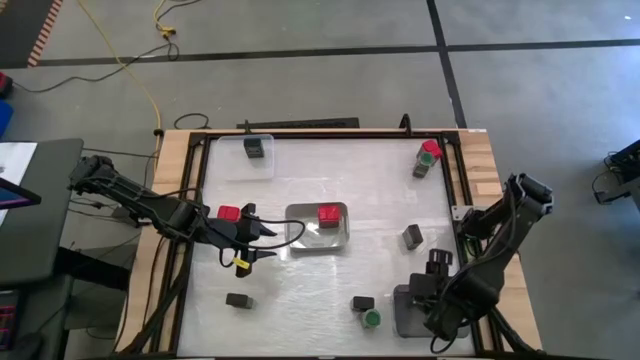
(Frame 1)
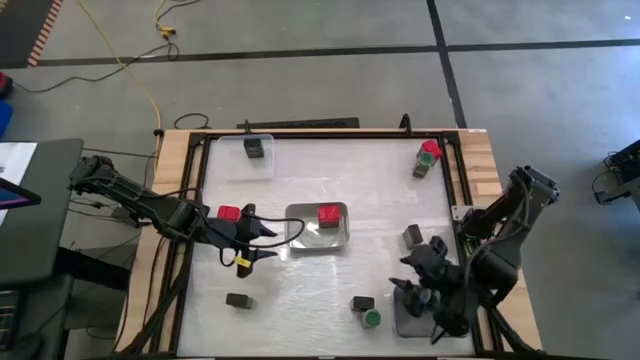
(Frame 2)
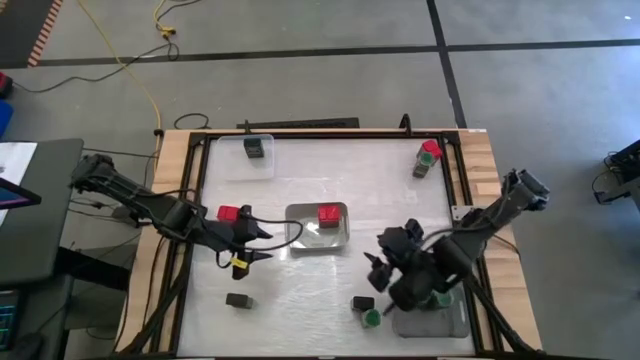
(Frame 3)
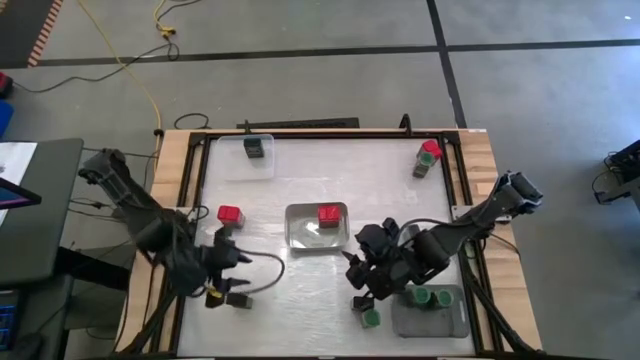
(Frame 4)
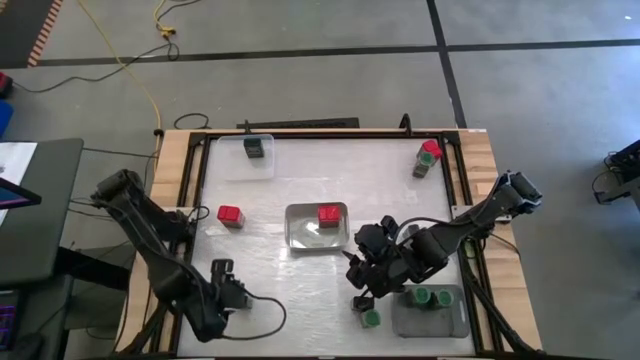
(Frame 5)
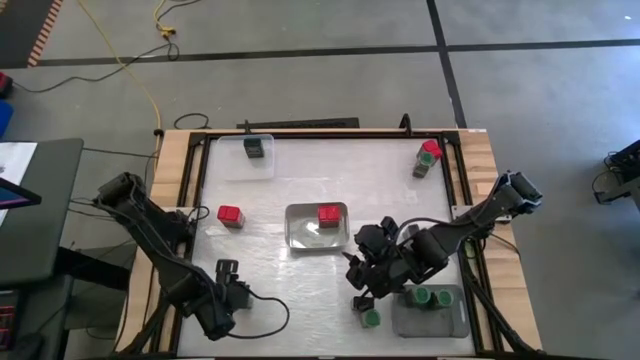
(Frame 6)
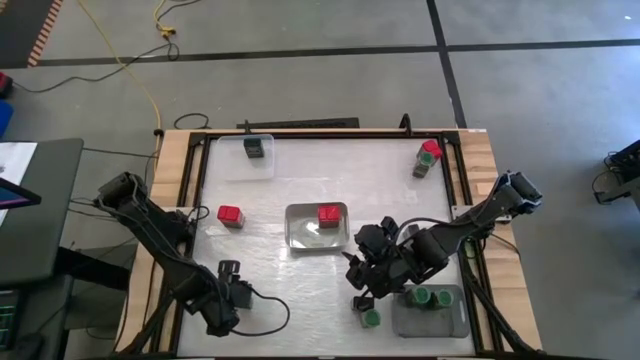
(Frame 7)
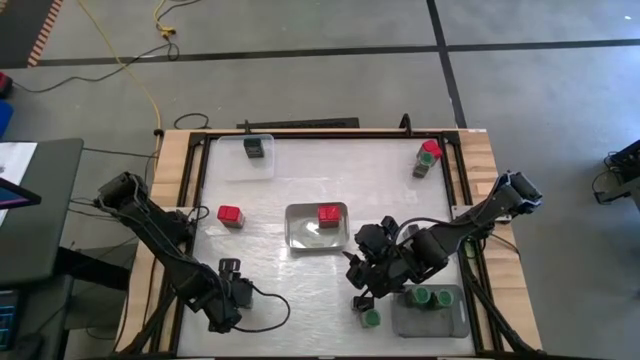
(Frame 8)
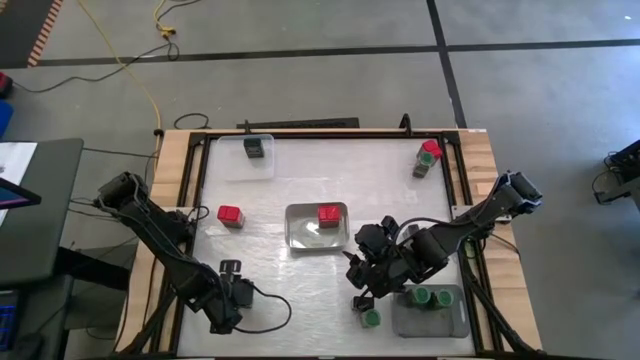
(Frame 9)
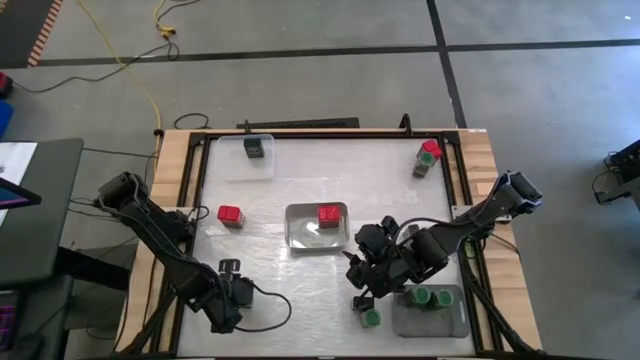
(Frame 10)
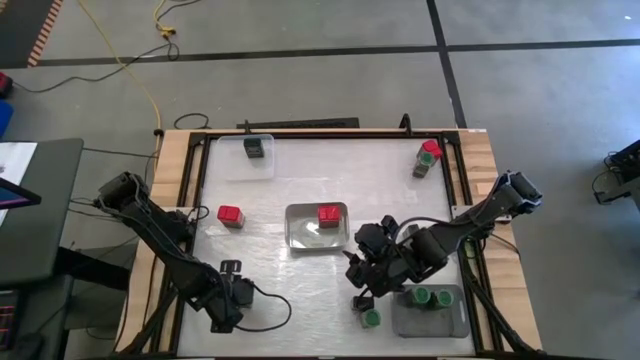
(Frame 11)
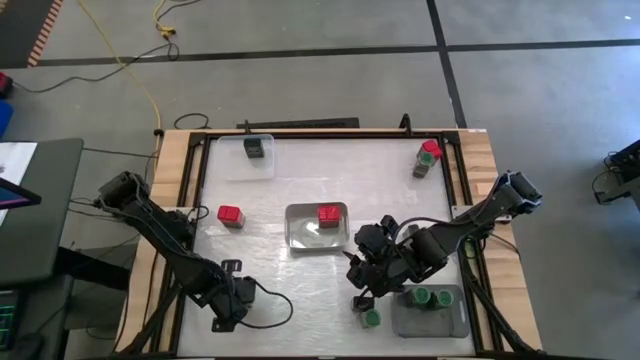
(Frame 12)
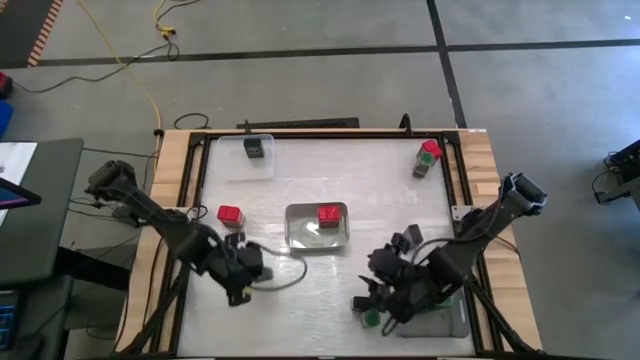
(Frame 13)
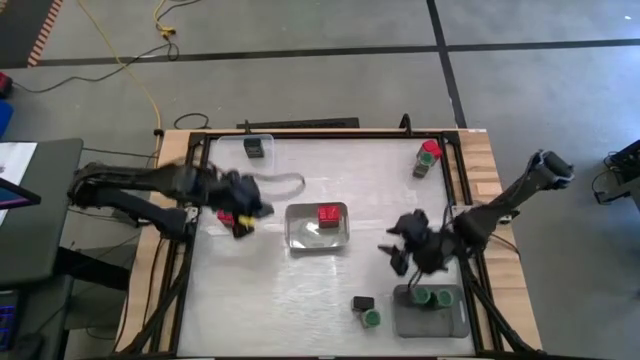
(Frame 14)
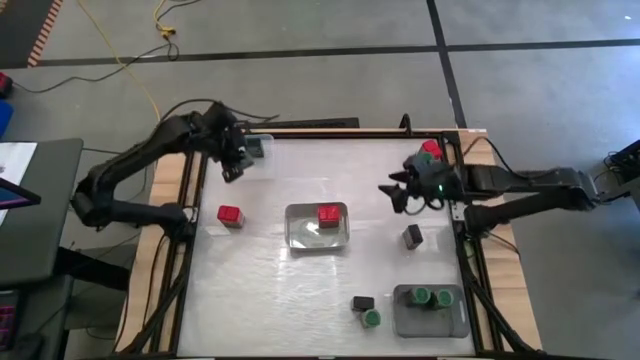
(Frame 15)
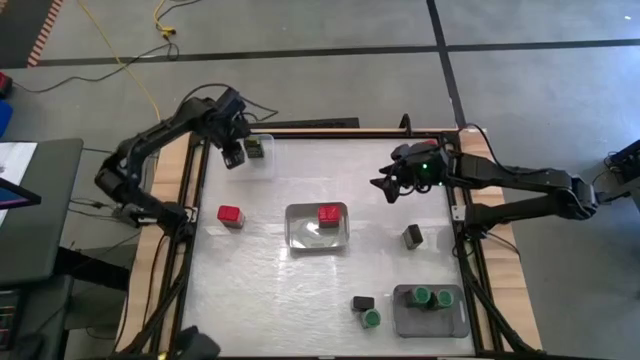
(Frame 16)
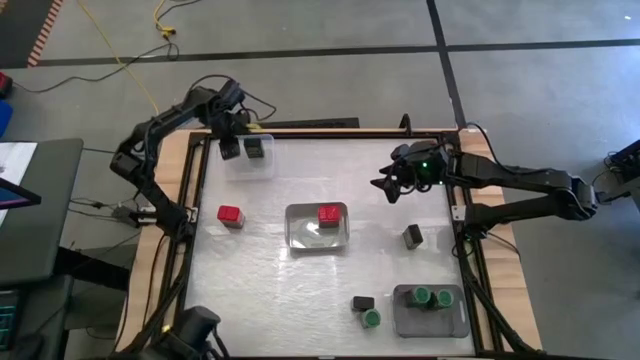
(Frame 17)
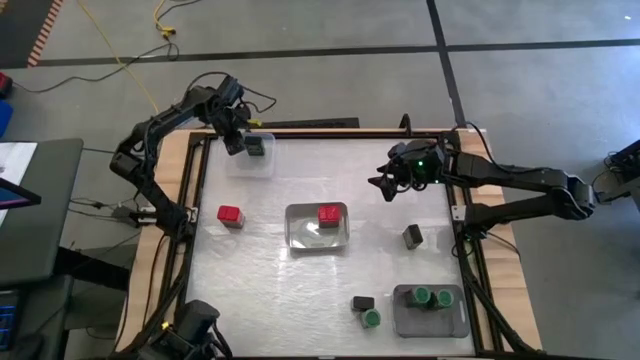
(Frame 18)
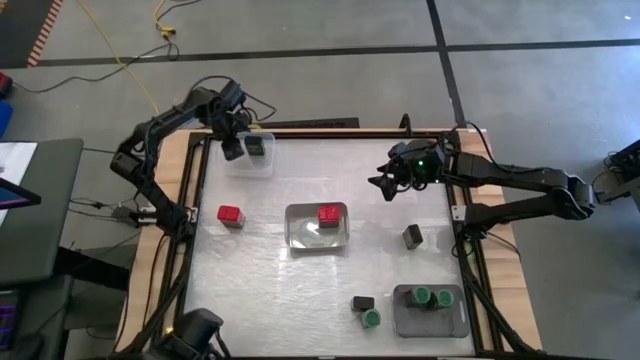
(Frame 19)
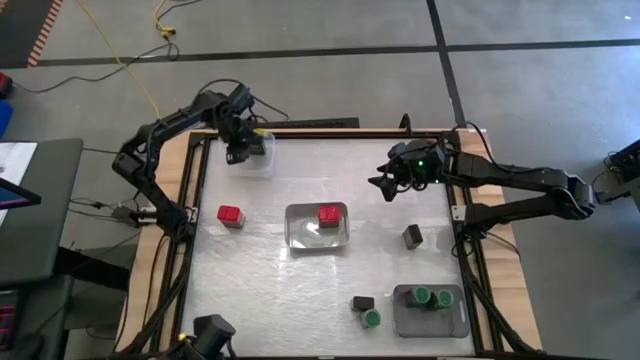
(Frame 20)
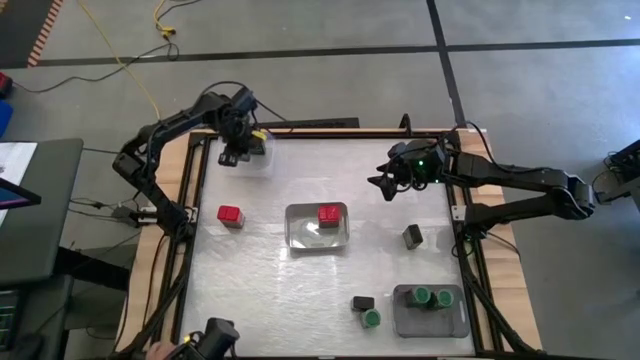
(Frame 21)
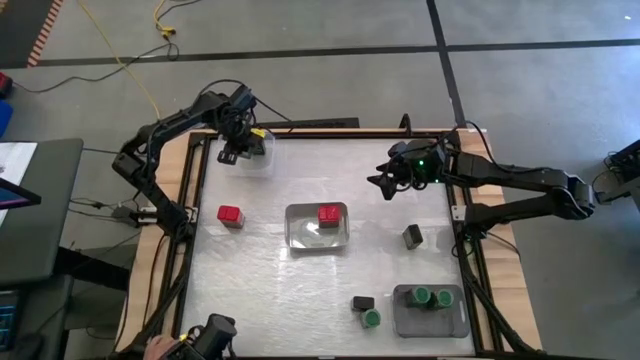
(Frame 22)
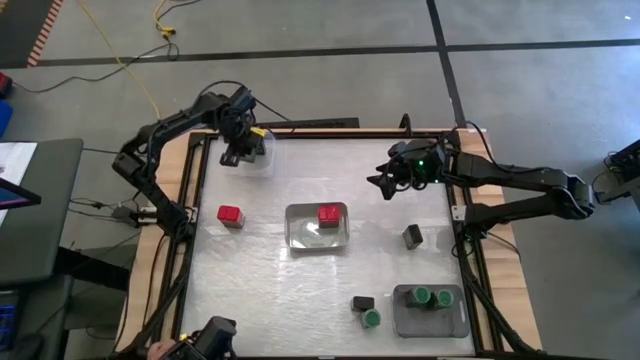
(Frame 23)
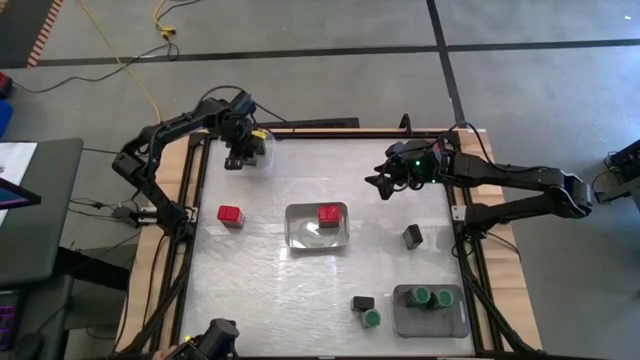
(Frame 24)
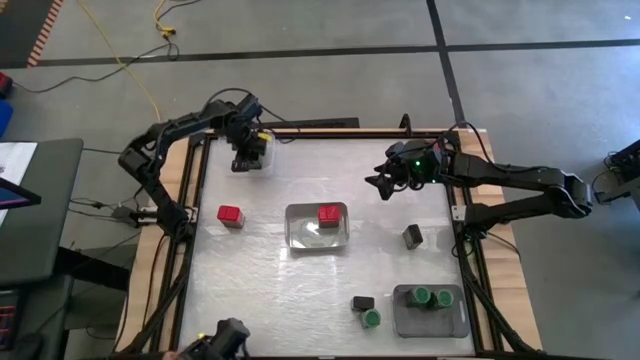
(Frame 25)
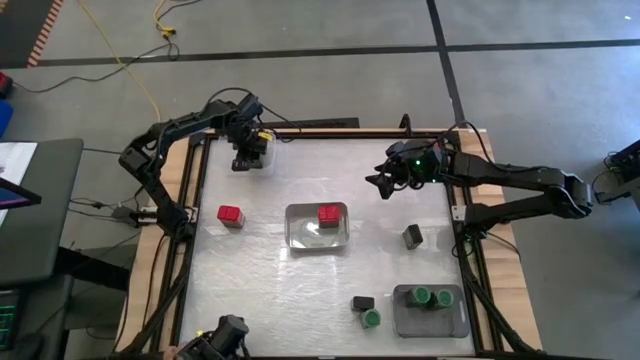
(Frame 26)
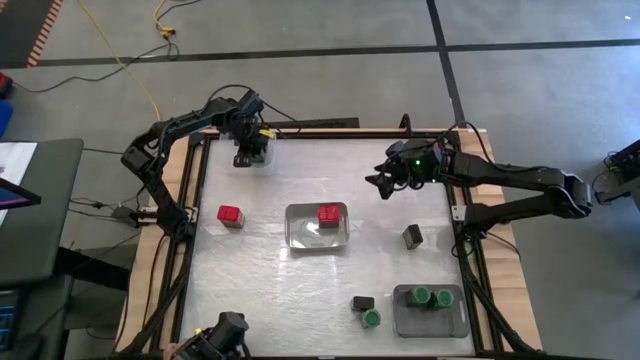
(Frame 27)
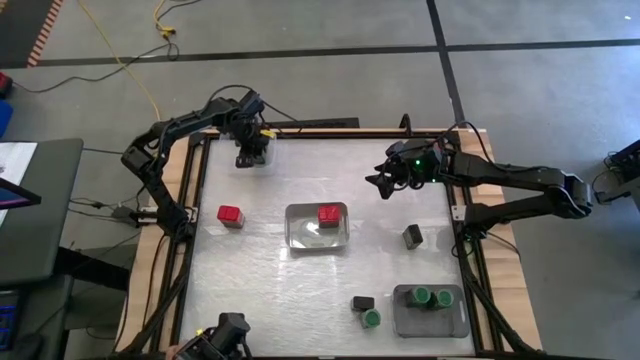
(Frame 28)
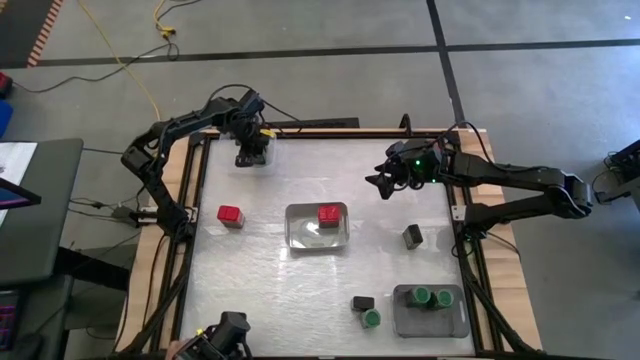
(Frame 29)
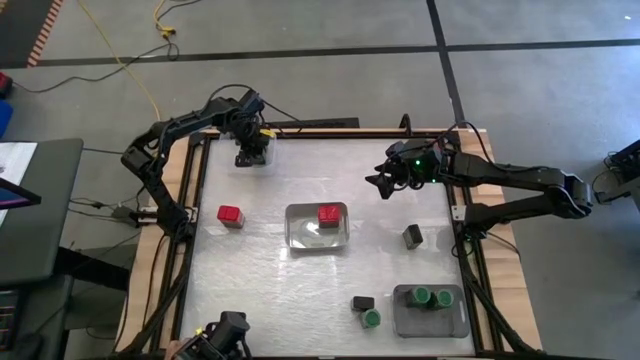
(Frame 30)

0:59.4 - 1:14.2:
Task: Sort spices by type
Put the bottom left black seasoning can into the transparent bin

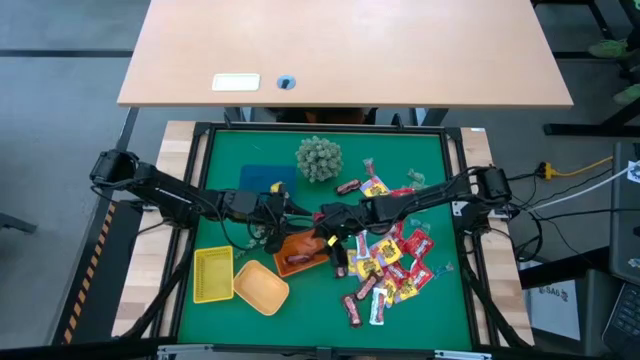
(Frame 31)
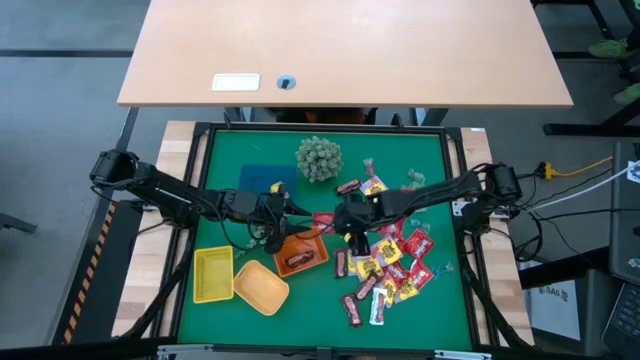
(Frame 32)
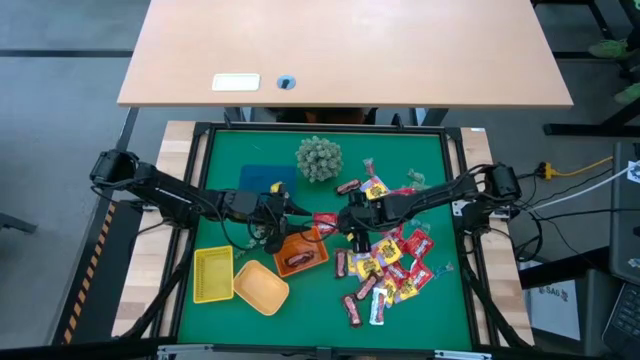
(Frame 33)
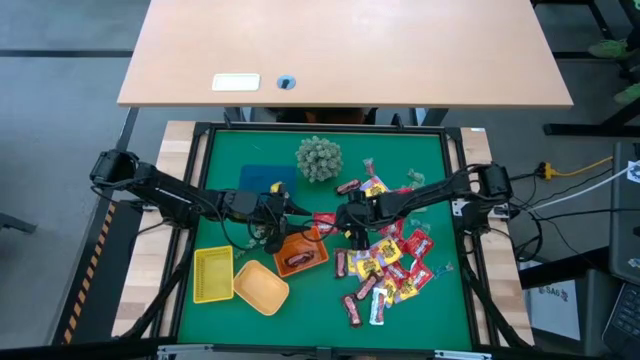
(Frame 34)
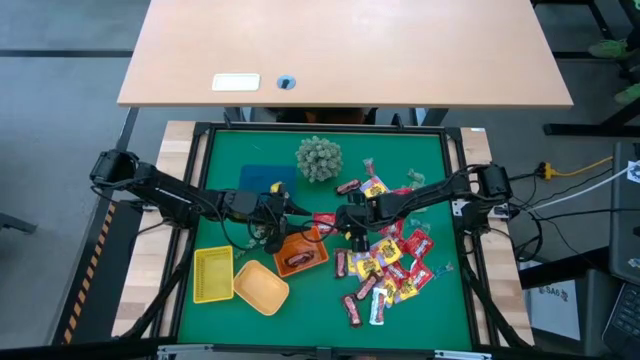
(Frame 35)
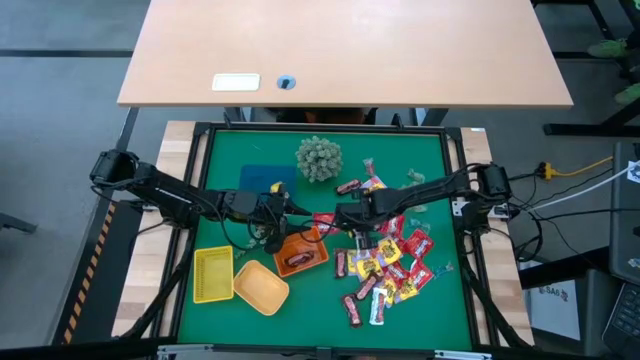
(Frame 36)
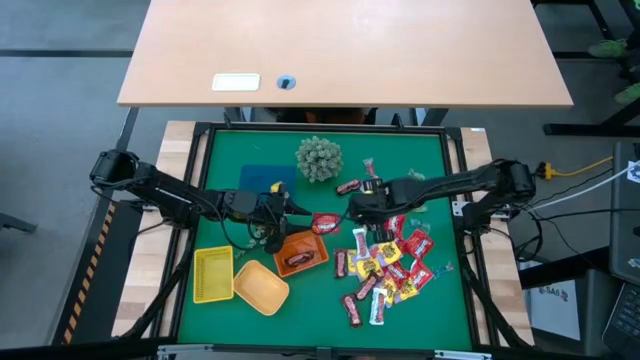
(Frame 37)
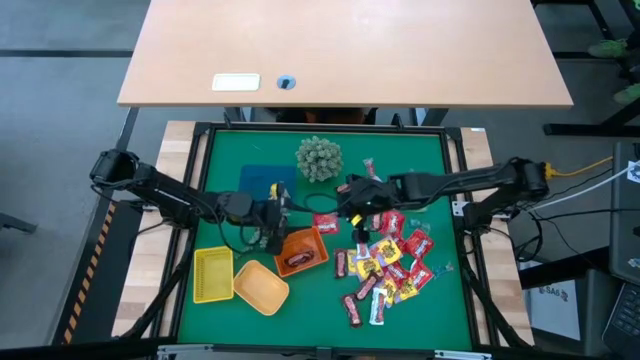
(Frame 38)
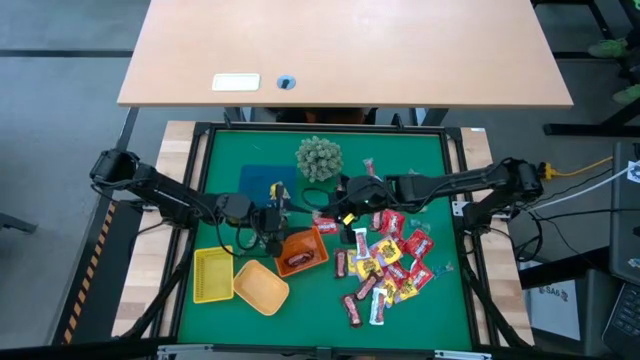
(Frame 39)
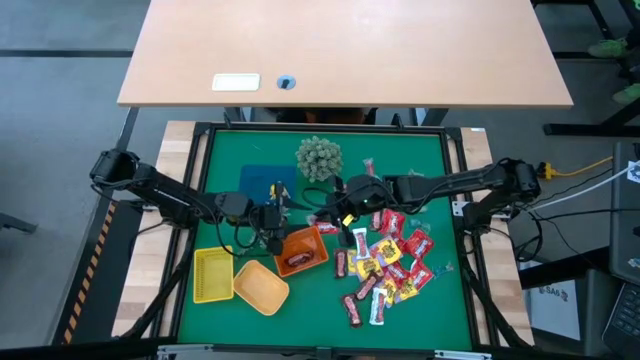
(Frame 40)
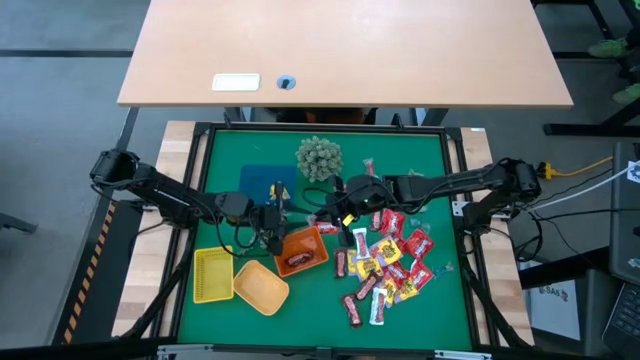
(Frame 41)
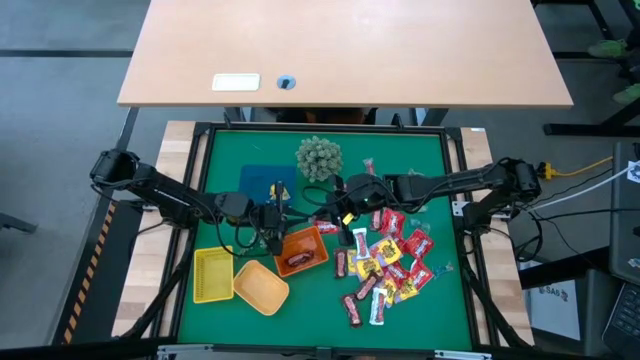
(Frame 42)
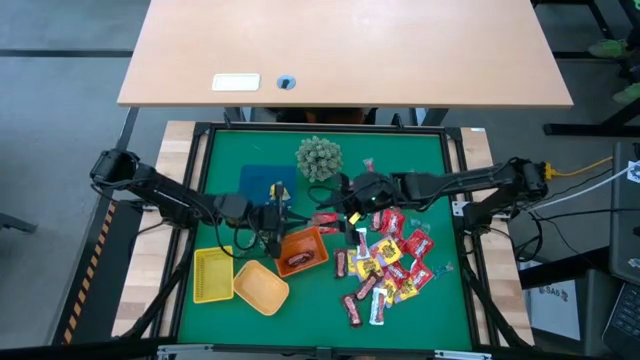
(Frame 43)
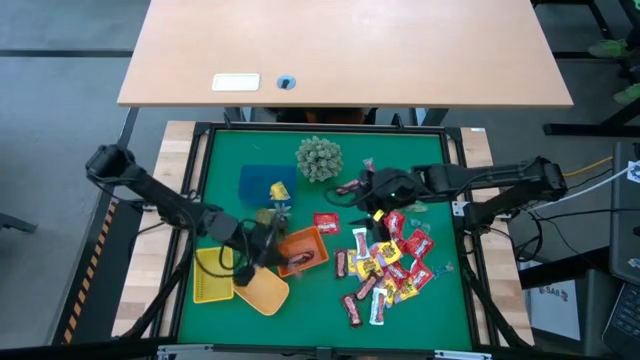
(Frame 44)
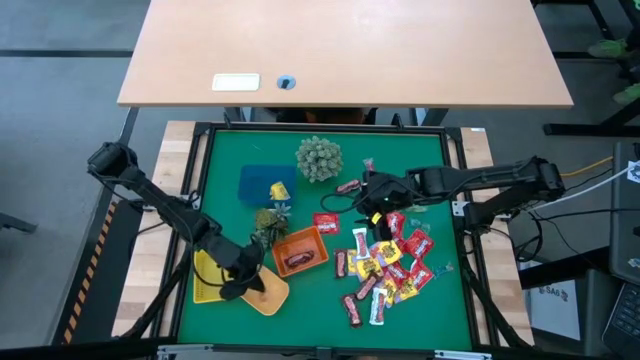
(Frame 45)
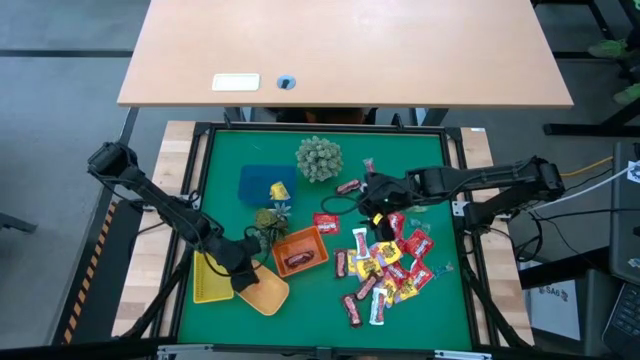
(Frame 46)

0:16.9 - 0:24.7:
Task: Sort candy
Put the orange gummy into the yellow bin
